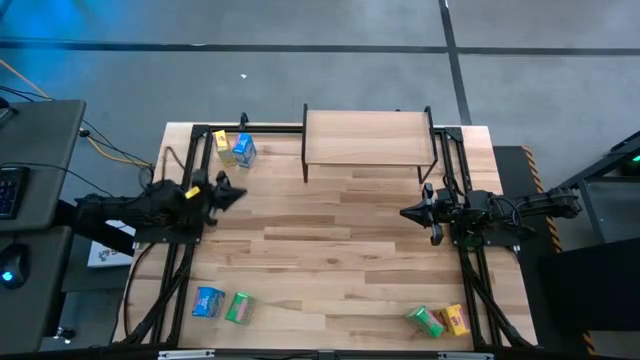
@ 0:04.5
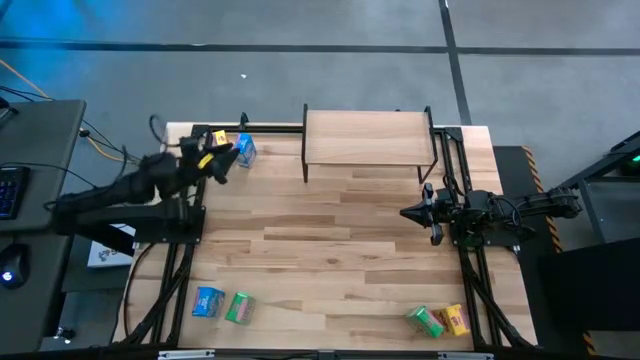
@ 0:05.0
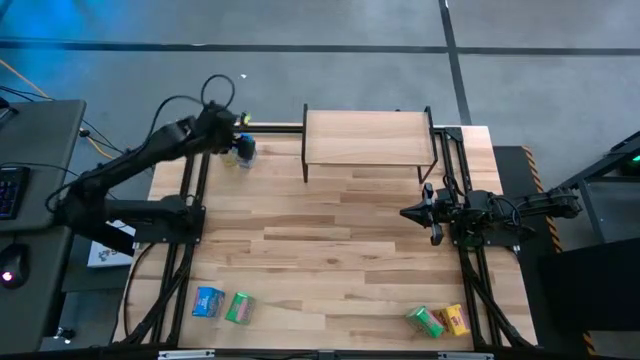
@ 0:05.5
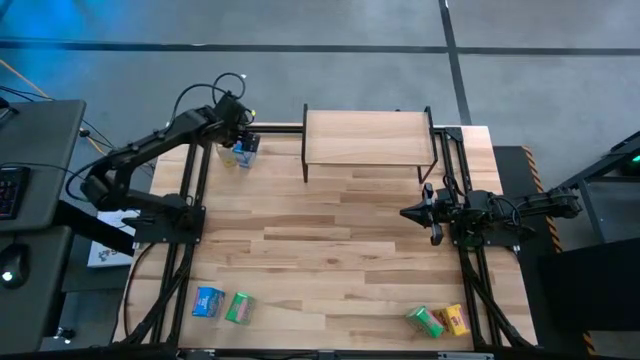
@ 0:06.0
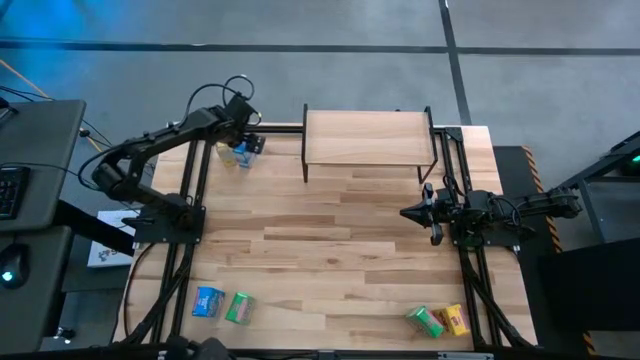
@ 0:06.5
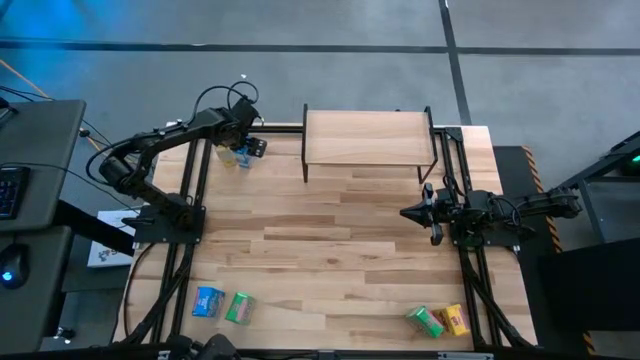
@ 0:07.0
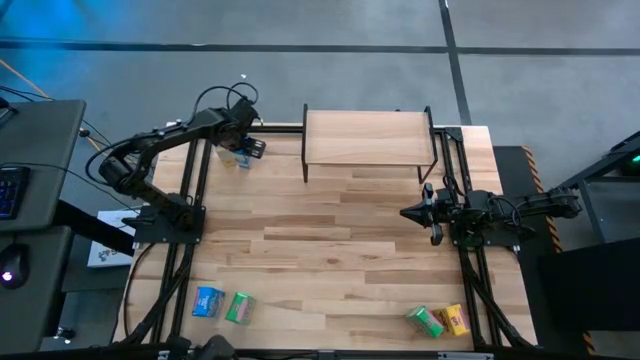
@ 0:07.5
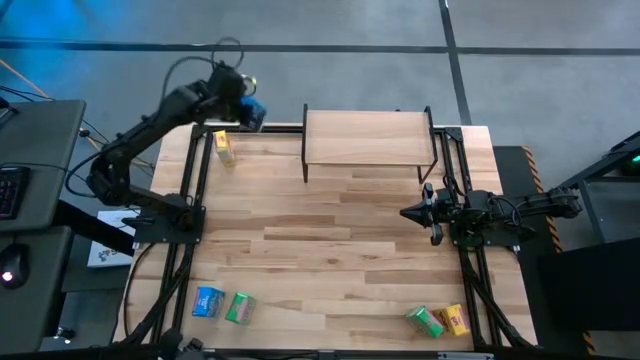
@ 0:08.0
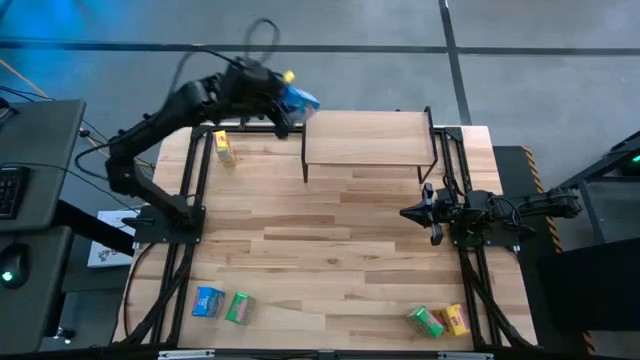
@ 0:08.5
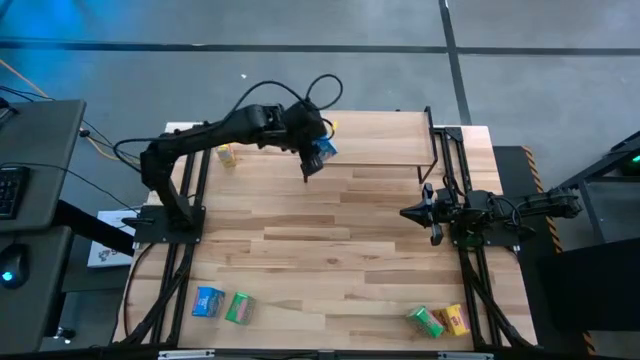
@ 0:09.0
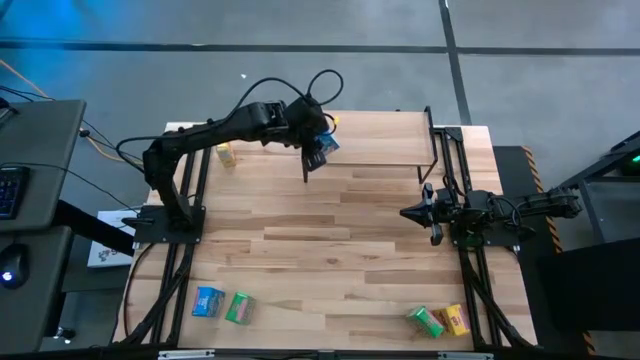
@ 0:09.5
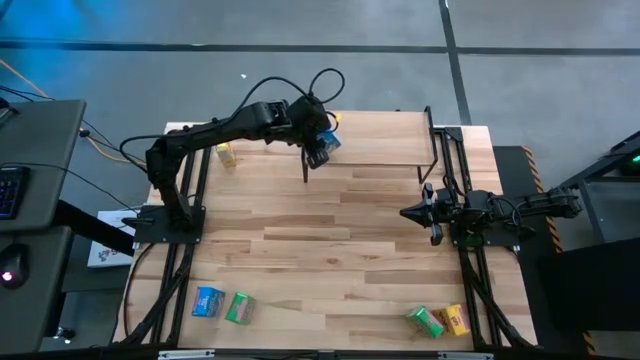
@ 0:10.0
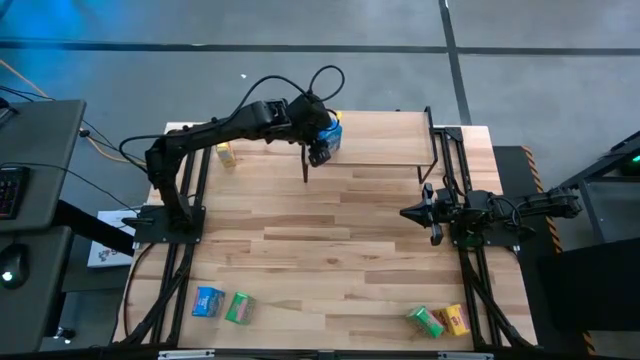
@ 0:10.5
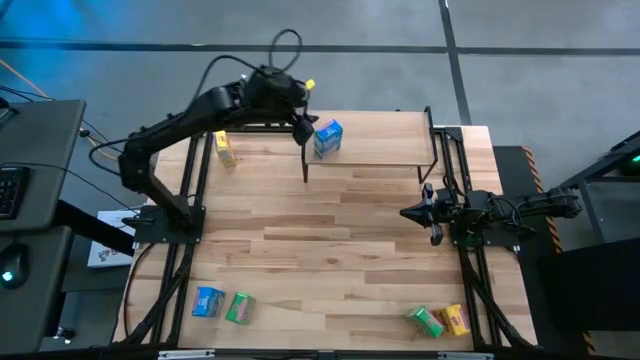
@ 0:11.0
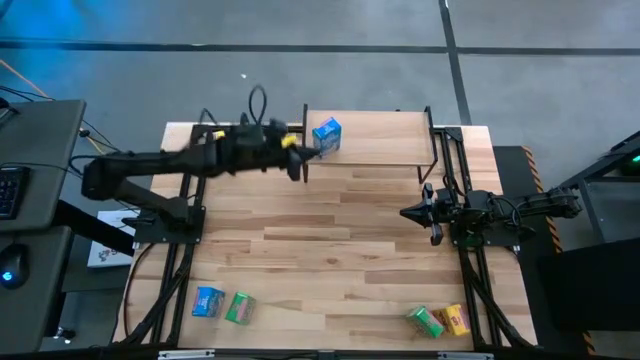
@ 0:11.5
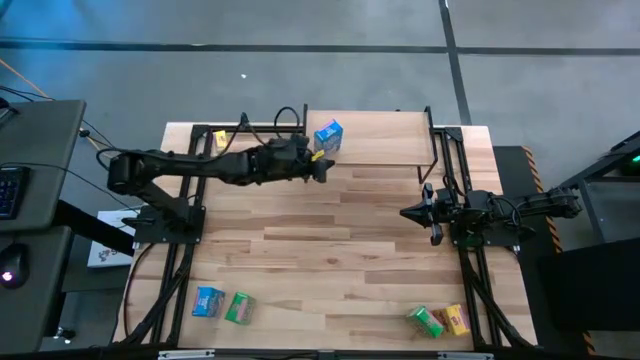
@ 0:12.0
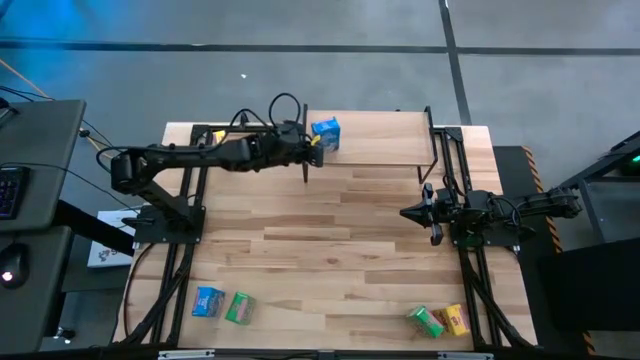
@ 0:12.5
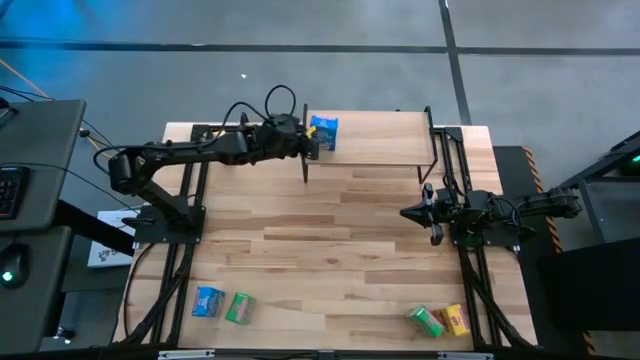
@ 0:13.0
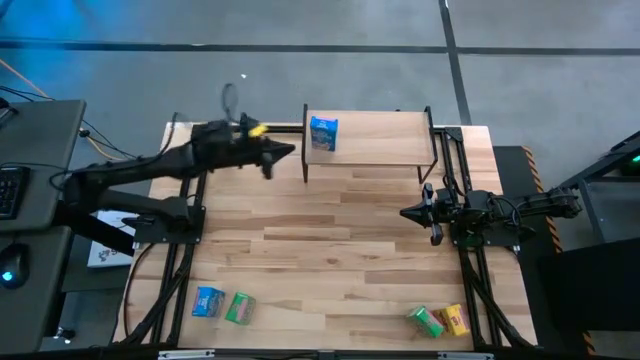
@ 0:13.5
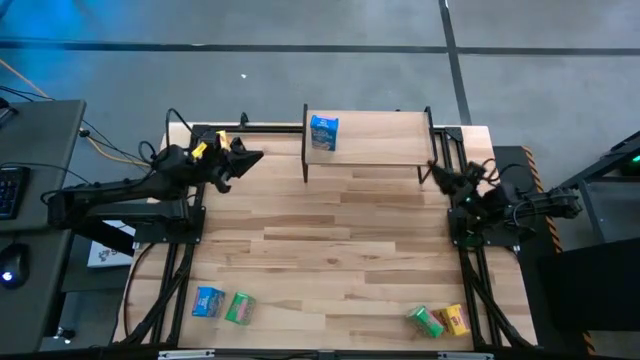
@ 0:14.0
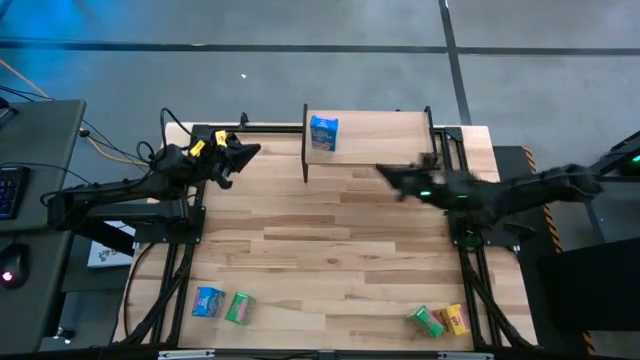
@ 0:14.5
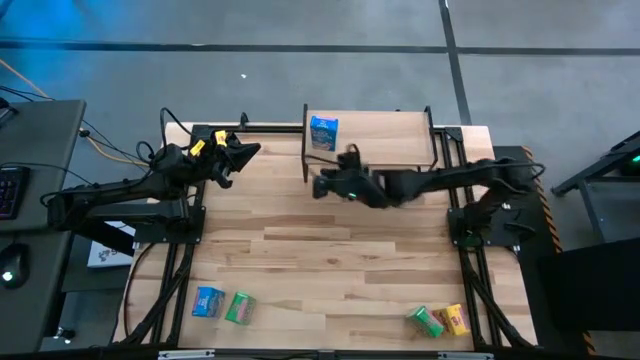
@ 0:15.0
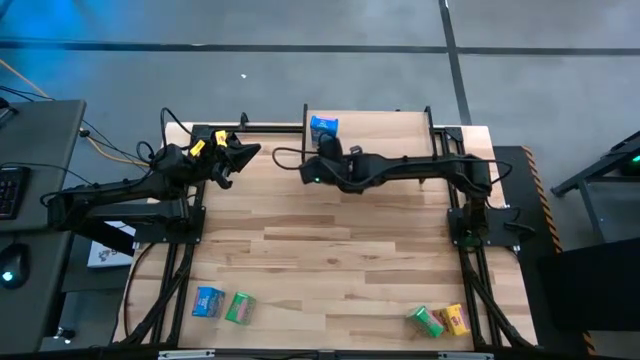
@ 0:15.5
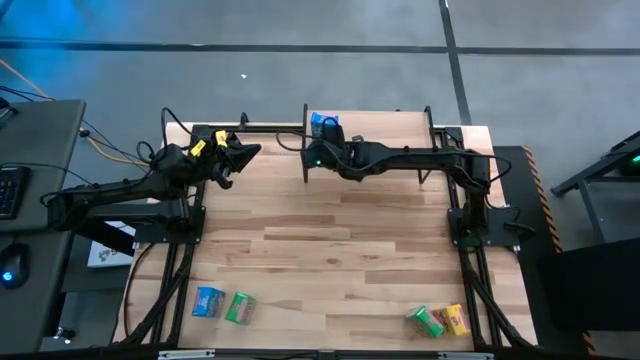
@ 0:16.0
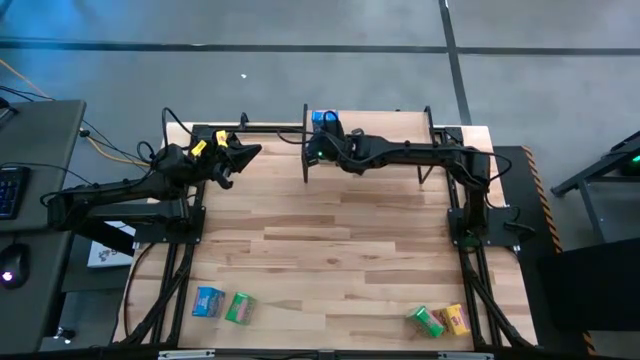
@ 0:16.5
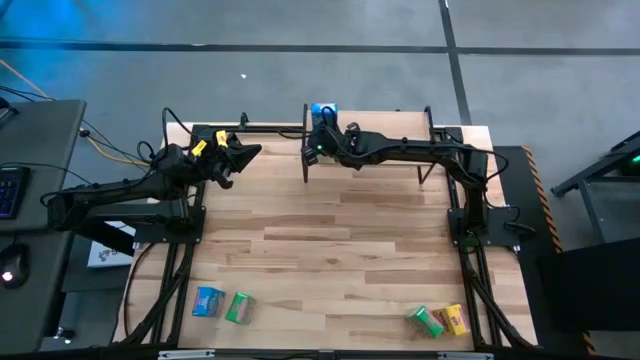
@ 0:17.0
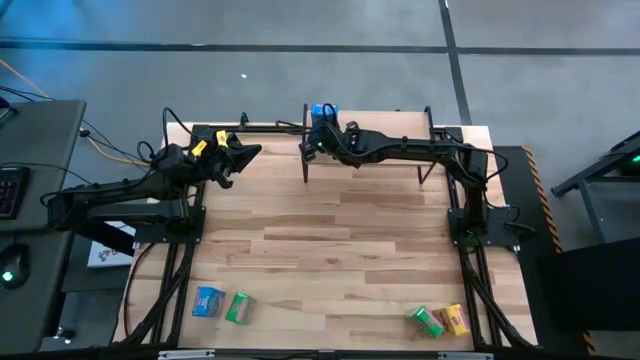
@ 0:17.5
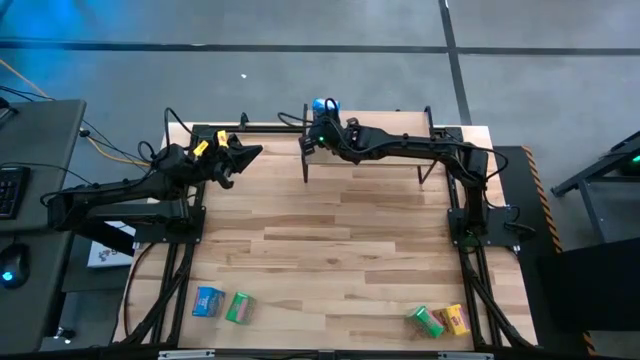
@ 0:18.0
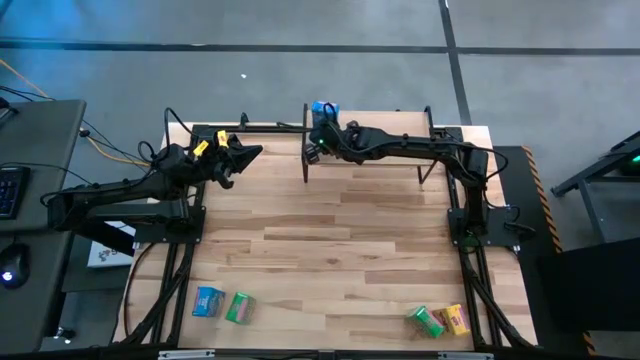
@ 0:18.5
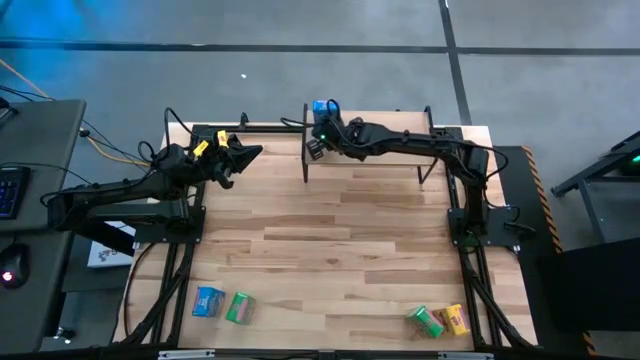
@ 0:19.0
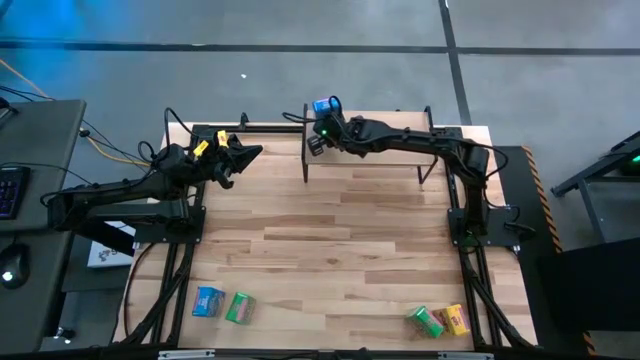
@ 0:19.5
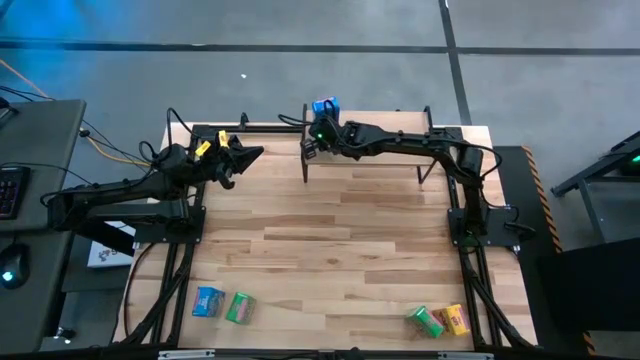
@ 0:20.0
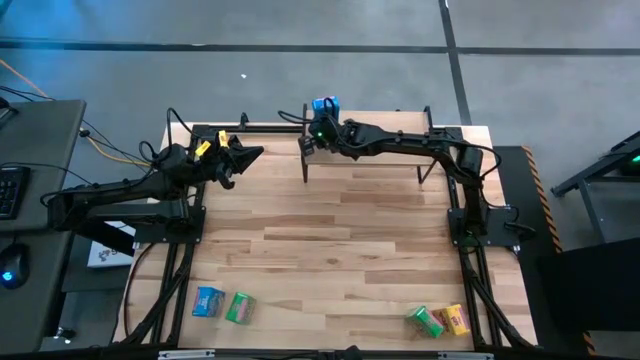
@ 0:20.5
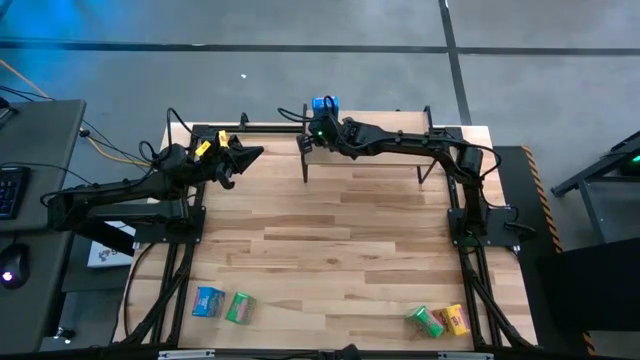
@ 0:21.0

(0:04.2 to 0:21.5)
Task: Stack cereal on shelf
Put the top blue cereal box on the shelf

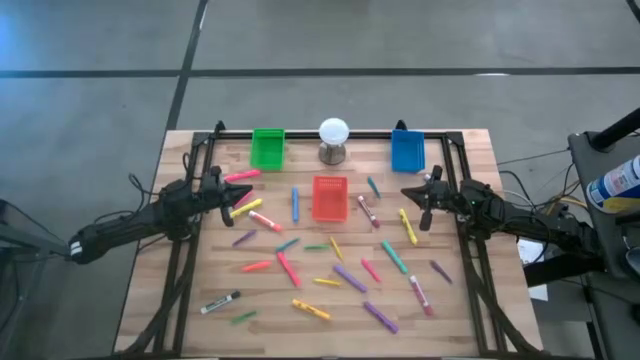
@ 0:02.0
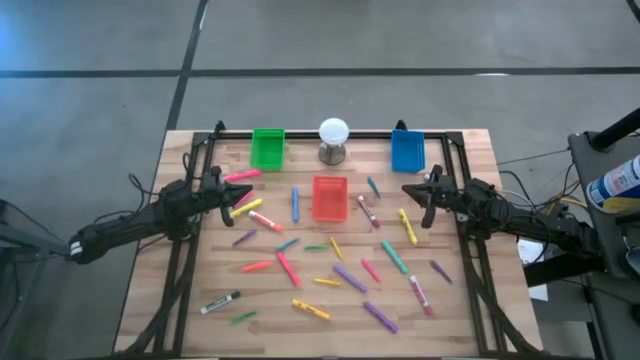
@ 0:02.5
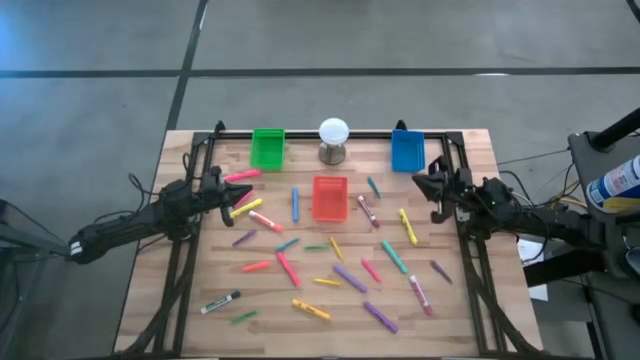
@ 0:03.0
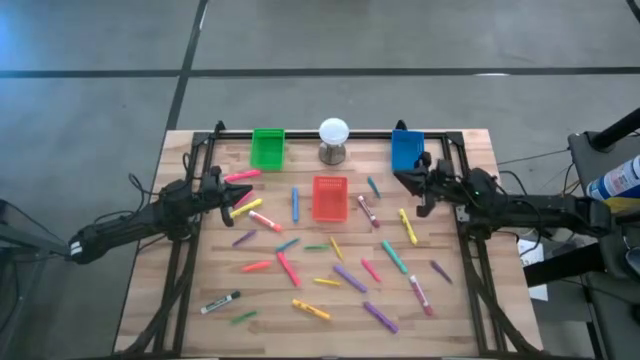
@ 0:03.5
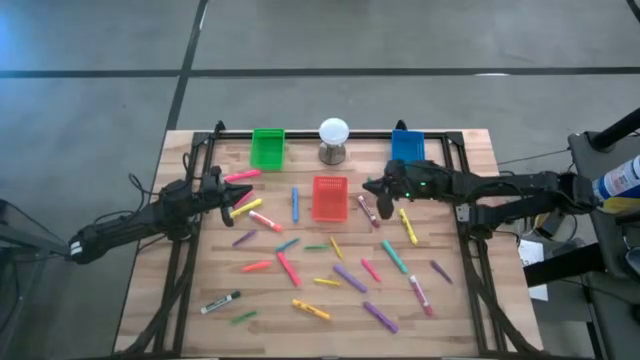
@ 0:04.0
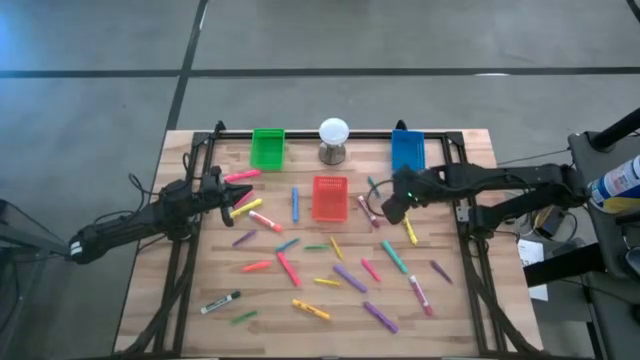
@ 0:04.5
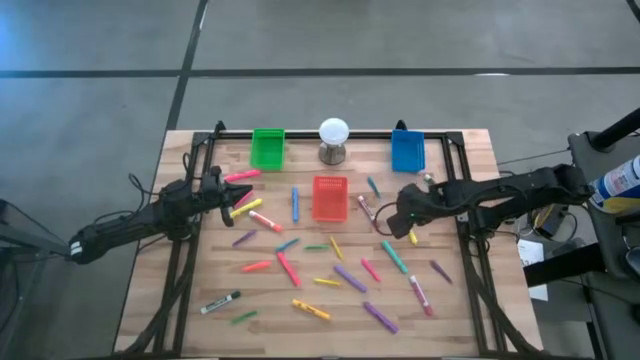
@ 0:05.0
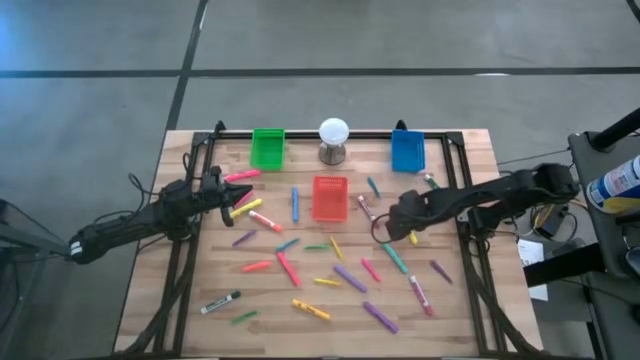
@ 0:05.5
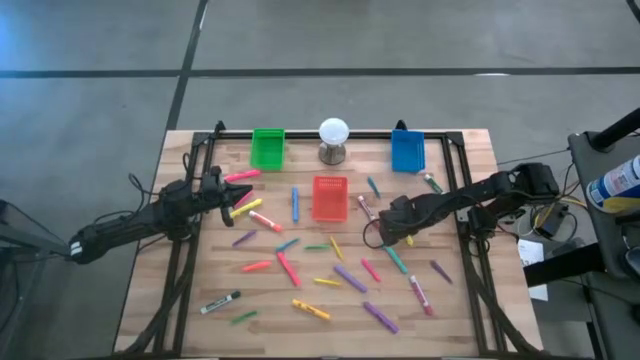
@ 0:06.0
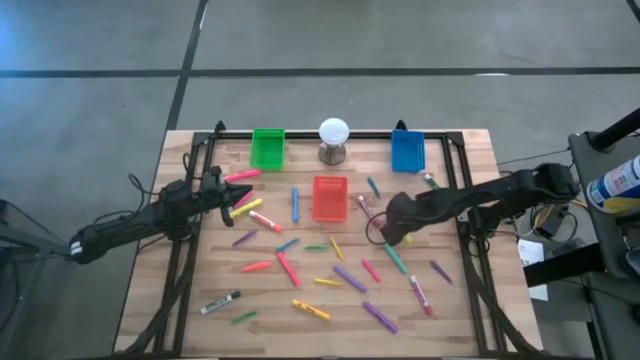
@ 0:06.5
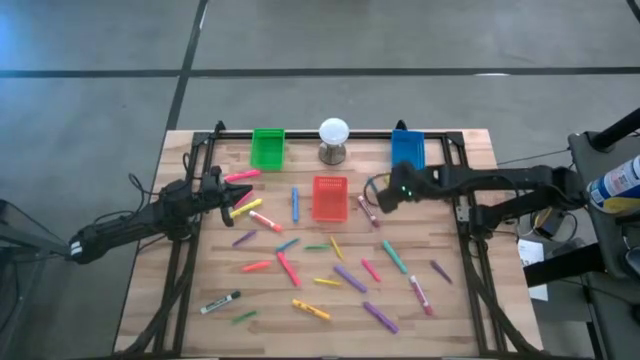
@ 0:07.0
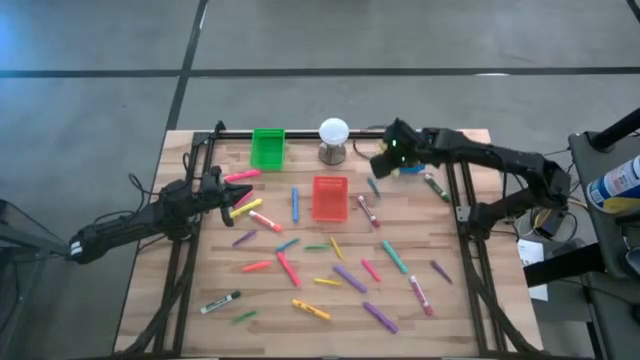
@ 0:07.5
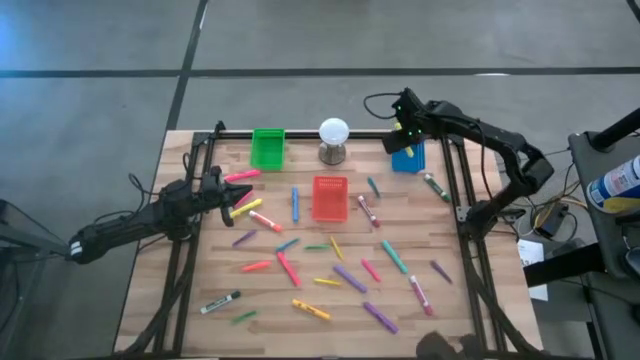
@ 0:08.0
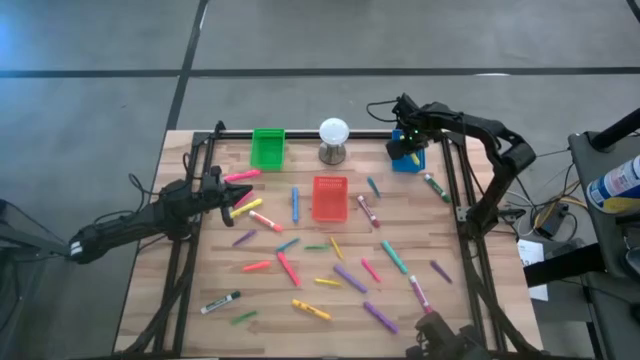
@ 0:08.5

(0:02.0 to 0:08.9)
Task: Pick & Place Markers
Put the top yellow highlighter into the blue bin
